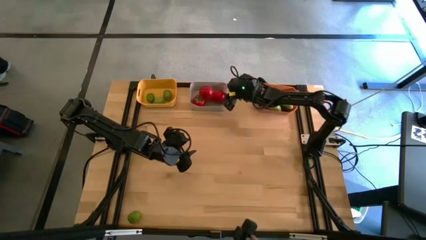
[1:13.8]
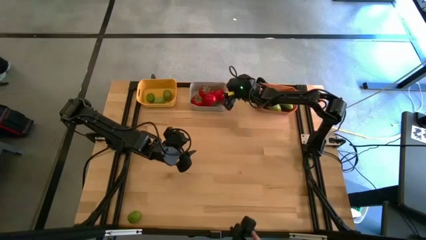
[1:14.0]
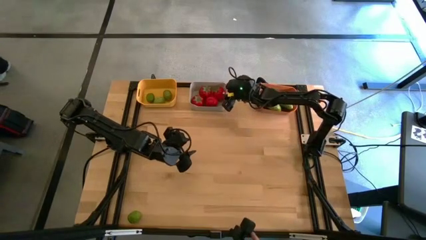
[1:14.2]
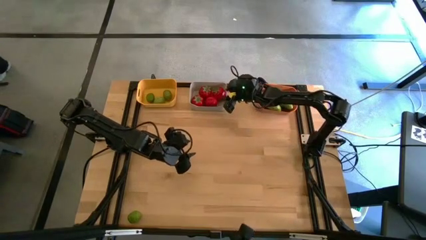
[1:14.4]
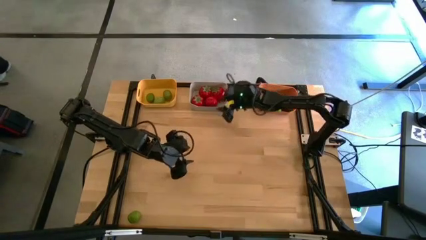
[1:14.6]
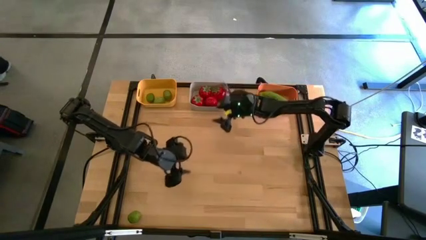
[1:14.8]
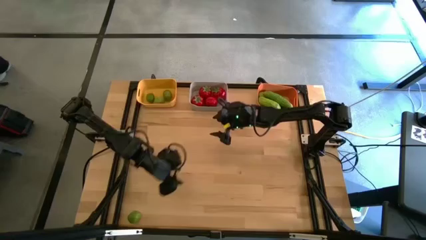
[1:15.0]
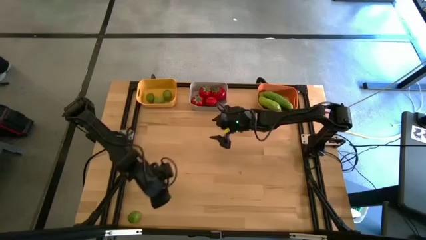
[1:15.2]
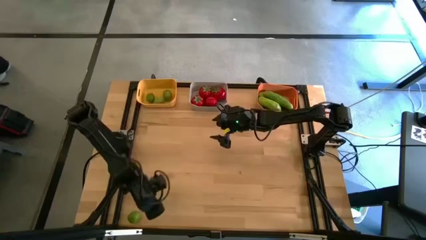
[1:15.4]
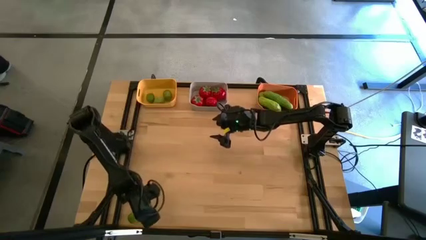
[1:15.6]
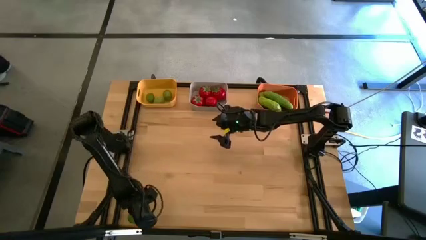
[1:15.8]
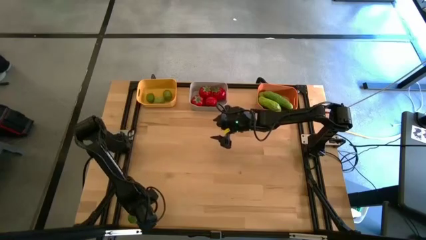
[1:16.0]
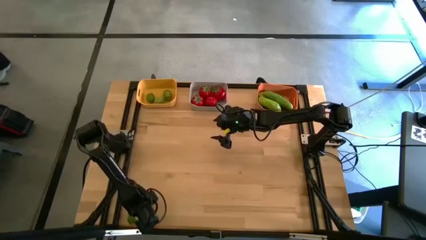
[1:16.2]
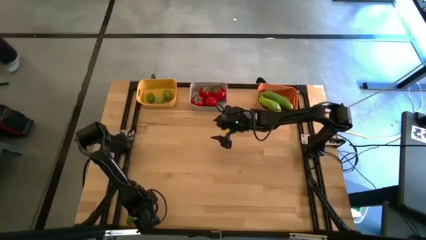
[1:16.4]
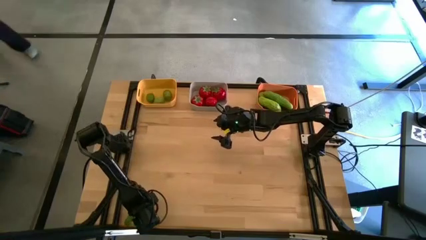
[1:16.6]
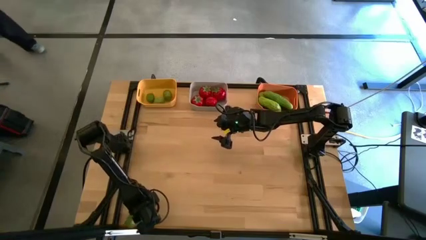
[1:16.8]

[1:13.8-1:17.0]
Task: Sort produce into baskets
Put the lime into the yellow bin

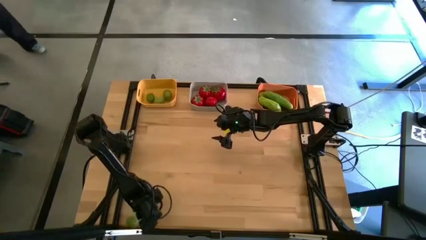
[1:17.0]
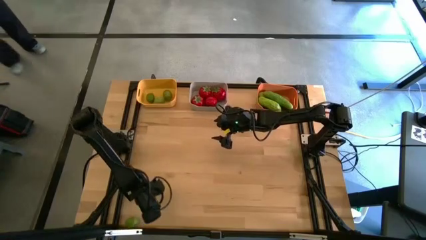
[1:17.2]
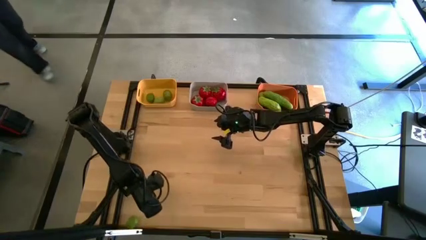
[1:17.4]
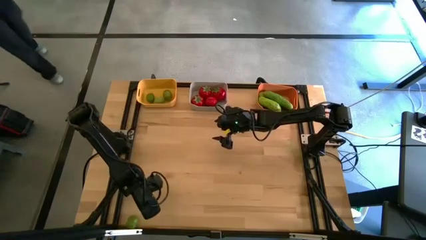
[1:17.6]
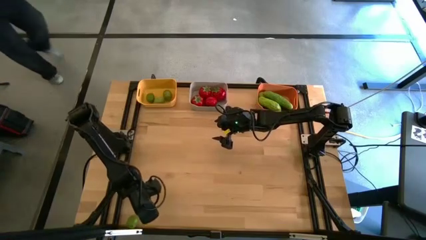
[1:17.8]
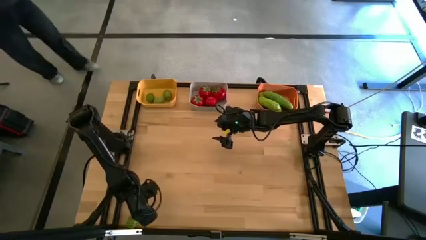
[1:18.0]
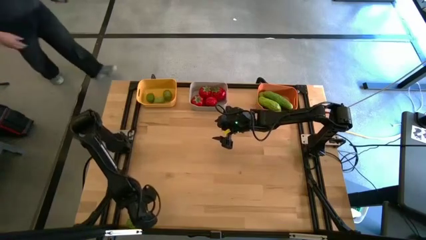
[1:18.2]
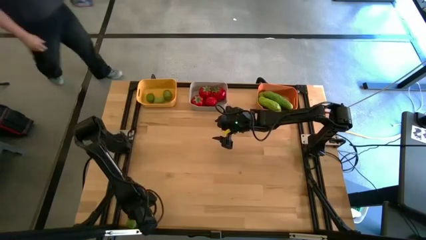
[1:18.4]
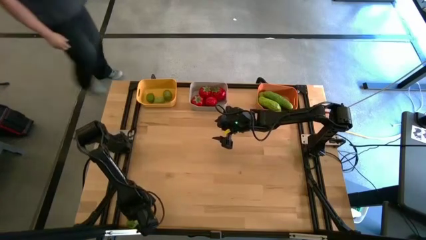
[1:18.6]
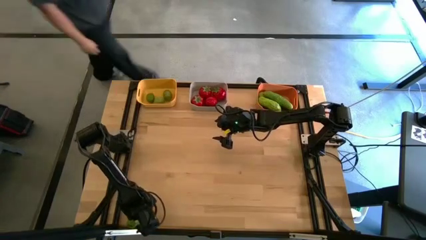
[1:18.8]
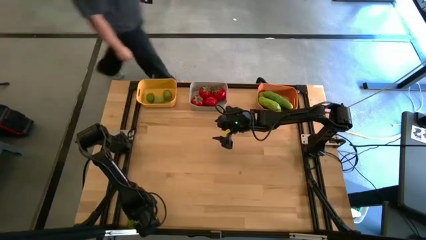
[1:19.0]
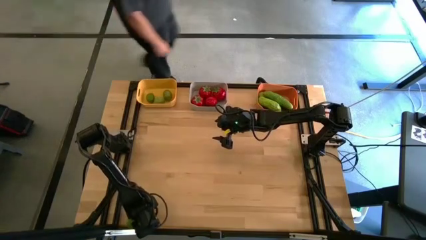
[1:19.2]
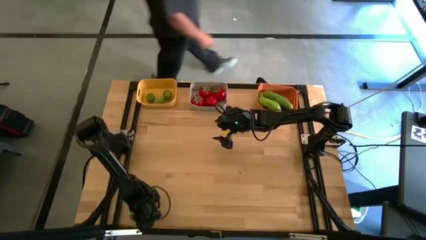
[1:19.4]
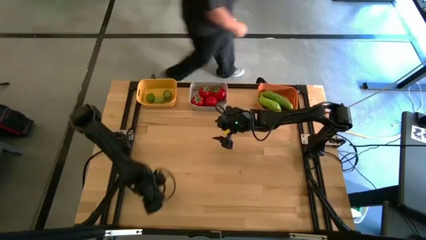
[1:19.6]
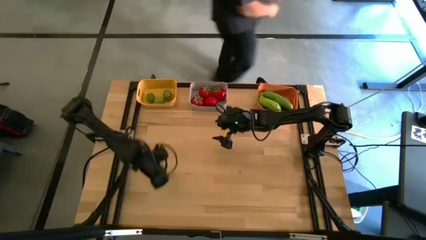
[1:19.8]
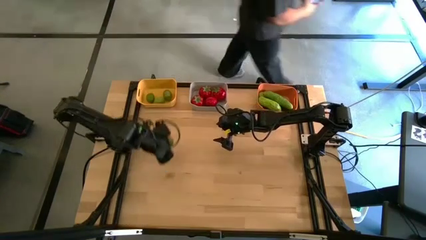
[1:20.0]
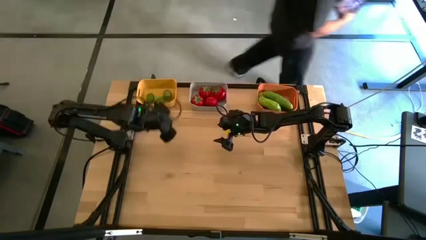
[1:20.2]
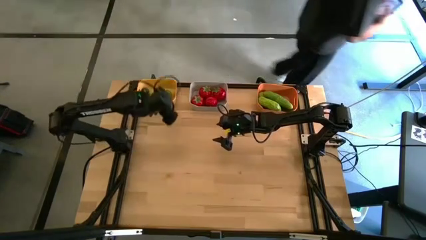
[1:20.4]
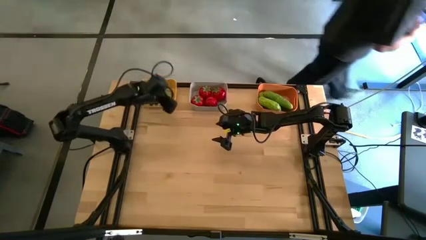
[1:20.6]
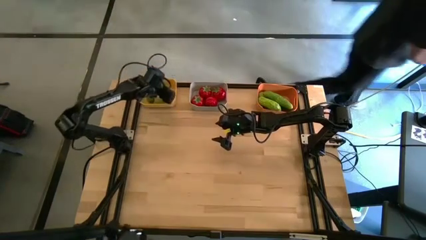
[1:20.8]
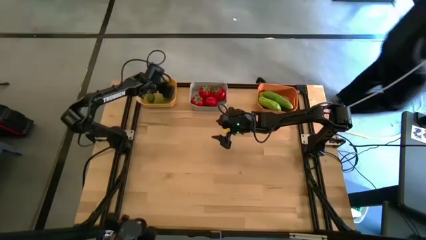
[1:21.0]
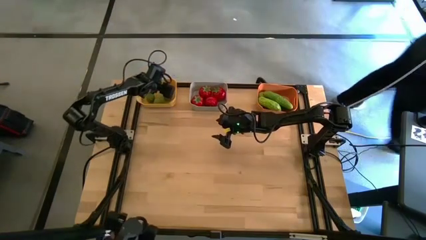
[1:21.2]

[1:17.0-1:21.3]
Put the lime into the yellow bin

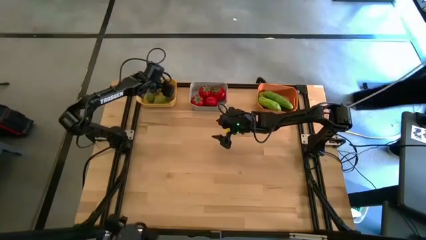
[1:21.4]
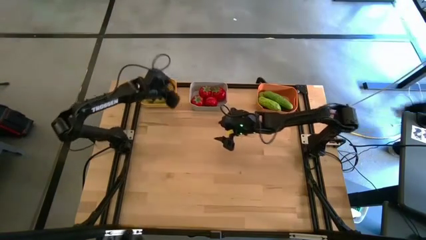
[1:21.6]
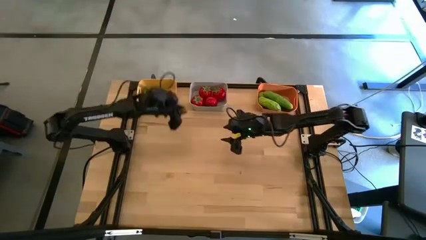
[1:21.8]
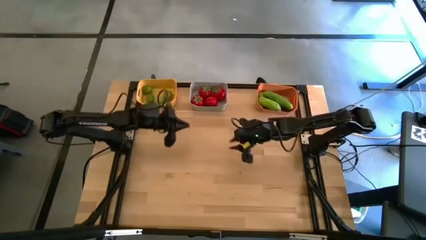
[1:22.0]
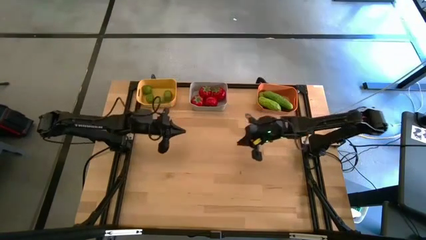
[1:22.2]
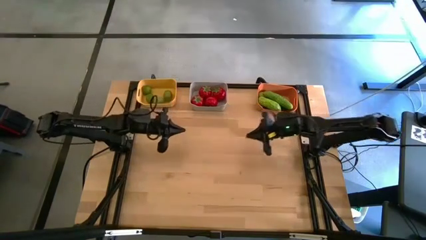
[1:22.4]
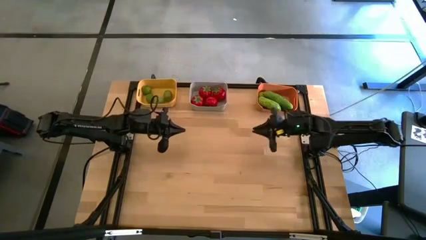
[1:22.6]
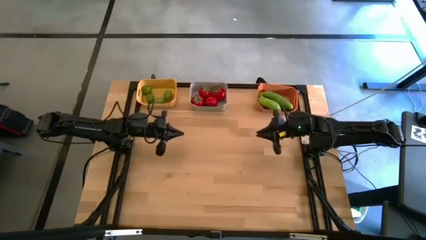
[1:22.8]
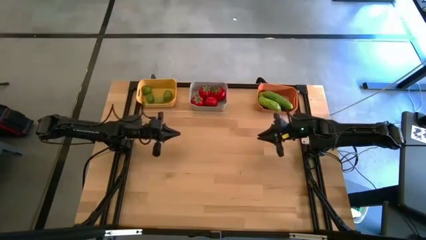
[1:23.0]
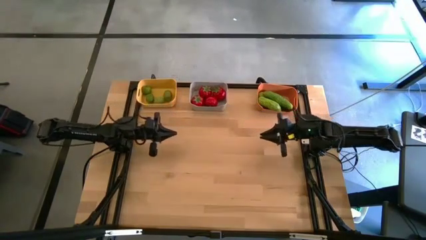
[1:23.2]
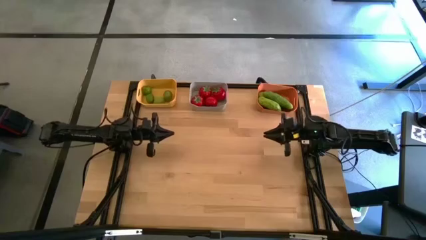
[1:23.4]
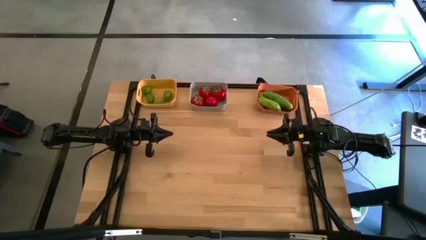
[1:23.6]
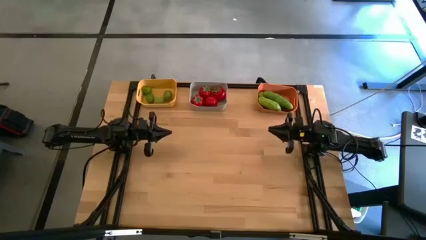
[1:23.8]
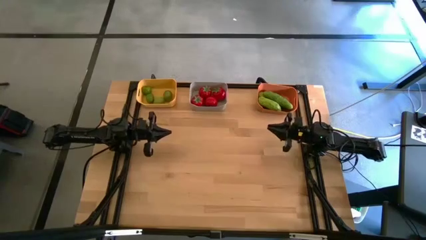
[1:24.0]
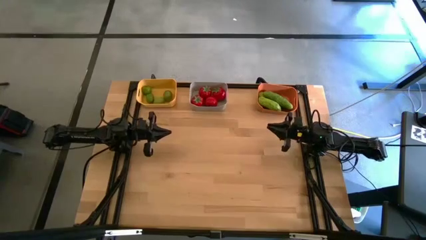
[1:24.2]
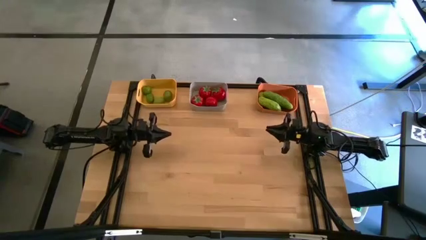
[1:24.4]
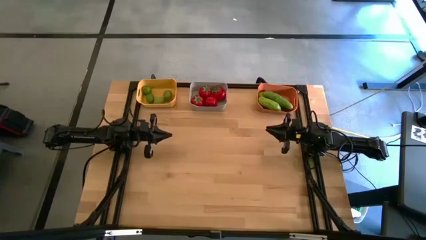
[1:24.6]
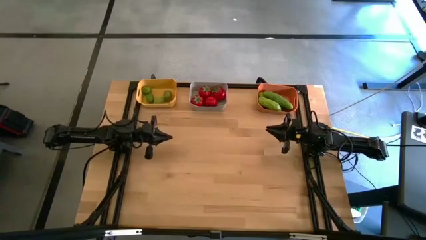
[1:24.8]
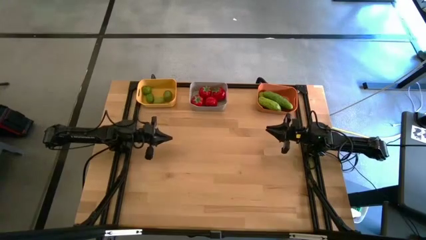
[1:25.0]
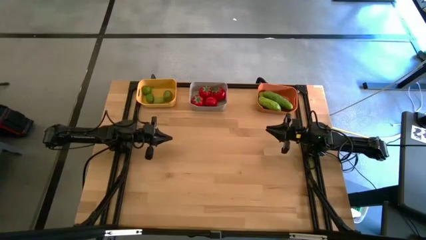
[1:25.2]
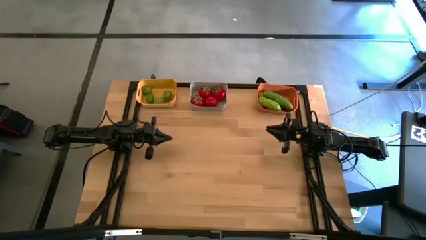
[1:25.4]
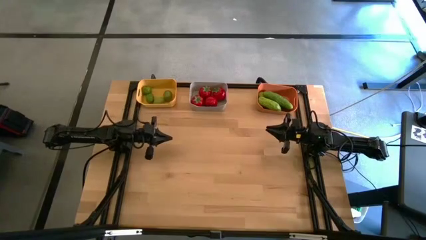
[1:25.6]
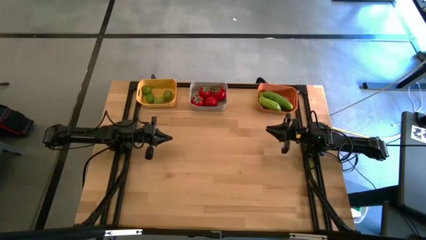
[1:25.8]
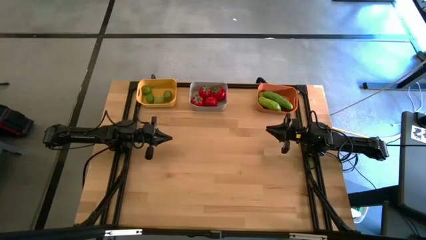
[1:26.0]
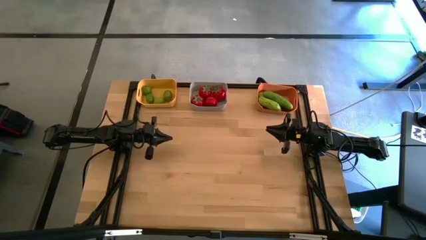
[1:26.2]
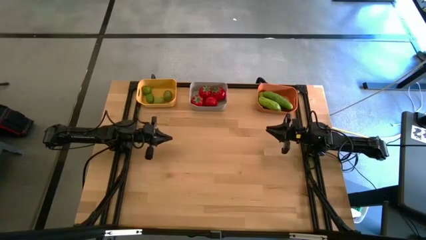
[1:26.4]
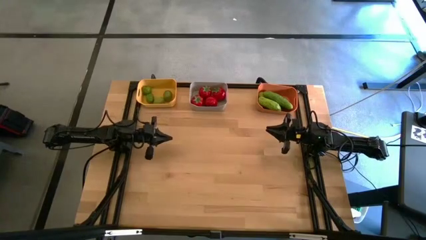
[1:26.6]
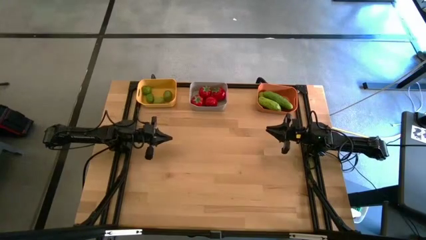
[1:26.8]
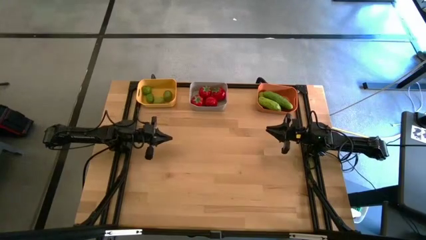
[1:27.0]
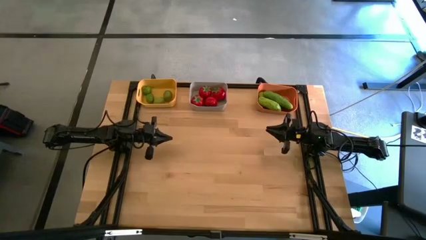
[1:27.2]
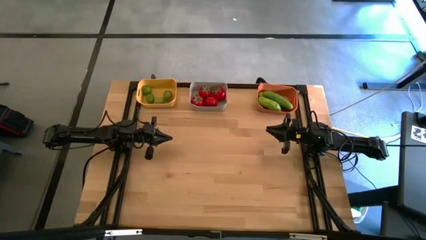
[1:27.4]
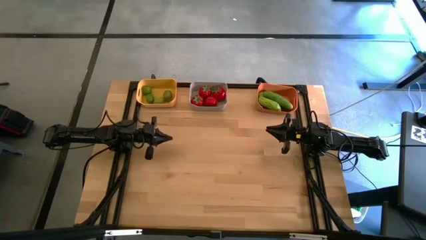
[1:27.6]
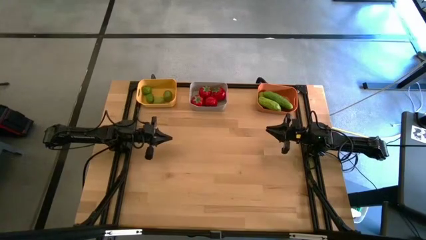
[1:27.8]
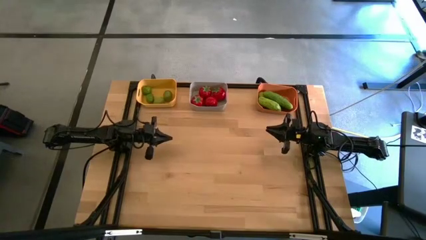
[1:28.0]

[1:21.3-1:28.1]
Return to Home Position

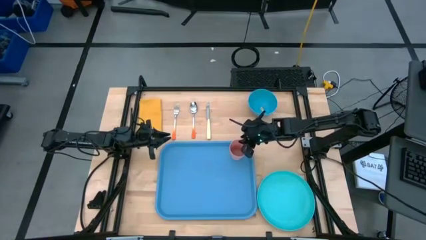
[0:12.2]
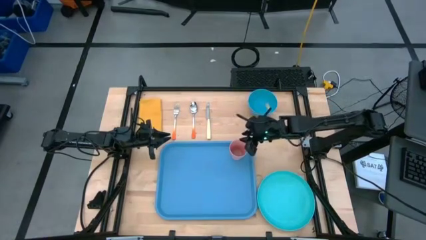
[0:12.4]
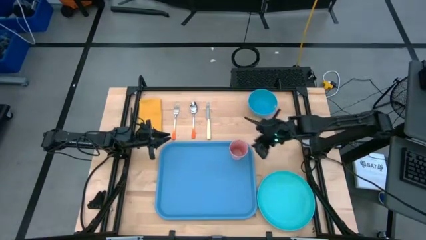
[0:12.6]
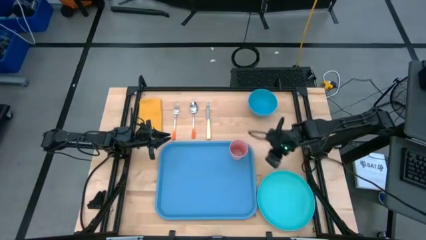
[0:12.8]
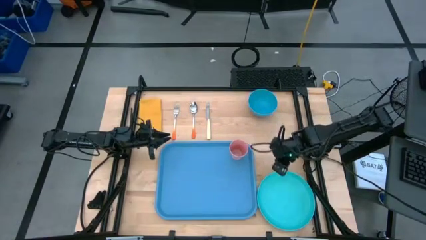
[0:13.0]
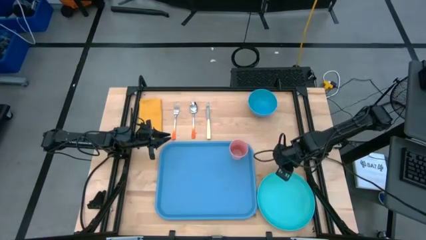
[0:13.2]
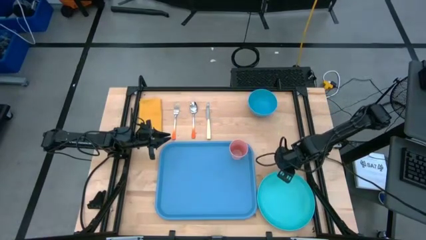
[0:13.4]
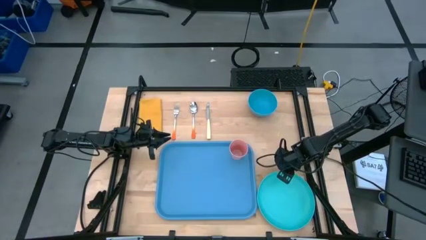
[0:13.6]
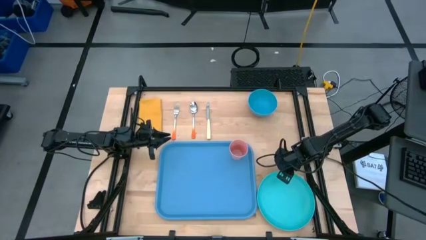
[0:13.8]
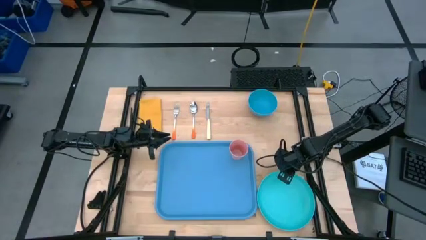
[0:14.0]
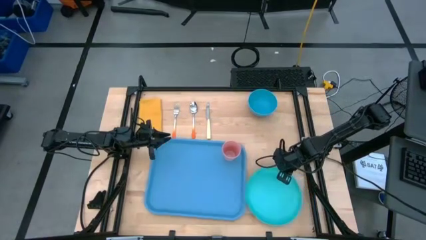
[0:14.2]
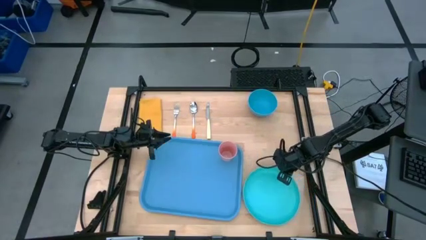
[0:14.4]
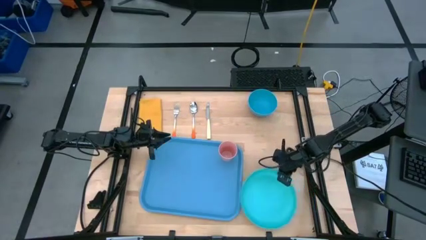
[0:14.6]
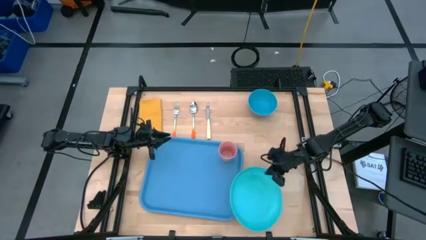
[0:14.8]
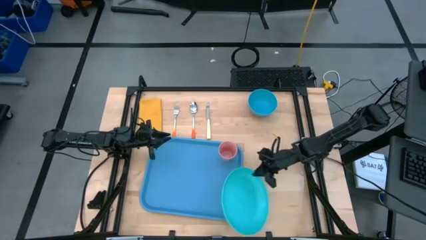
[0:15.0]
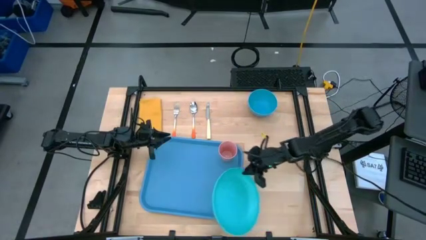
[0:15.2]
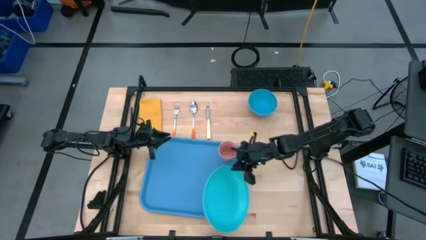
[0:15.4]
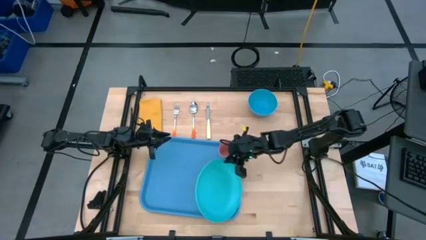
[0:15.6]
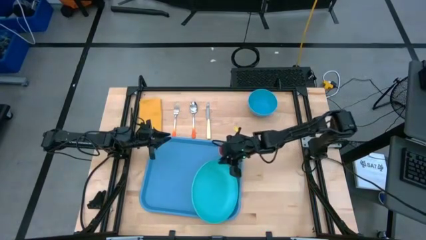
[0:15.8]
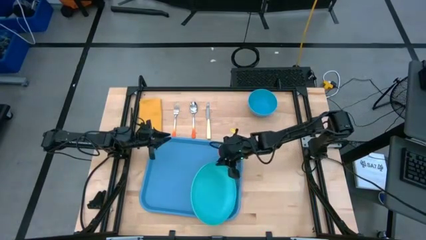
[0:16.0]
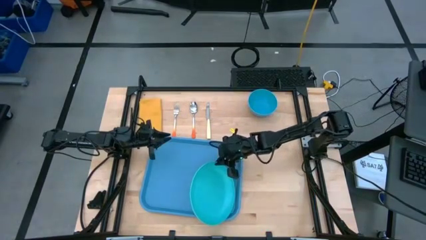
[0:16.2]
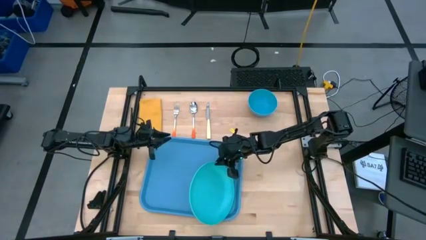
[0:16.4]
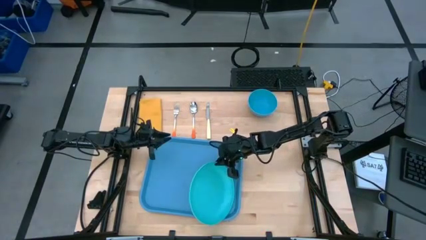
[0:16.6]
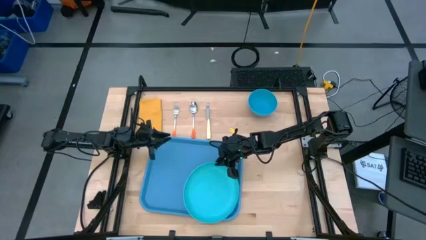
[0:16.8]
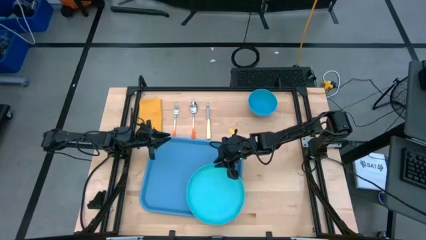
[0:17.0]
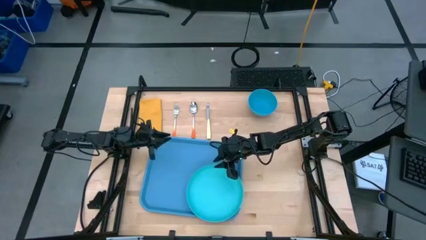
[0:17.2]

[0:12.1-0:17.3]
Task: Set up tray
Put the green plate on the blue tray
